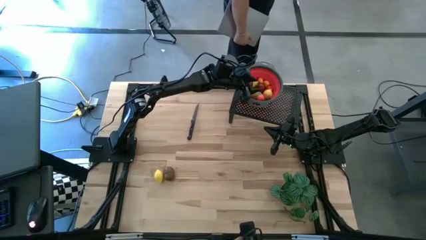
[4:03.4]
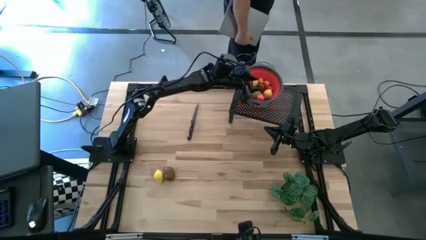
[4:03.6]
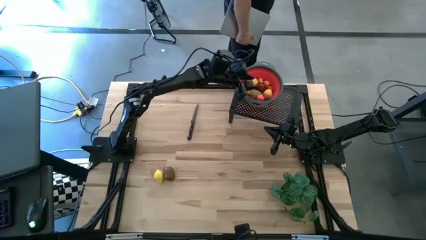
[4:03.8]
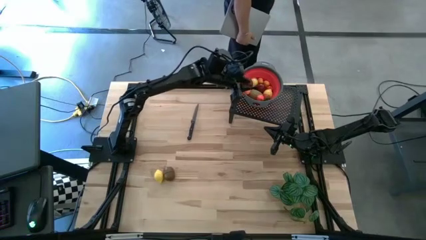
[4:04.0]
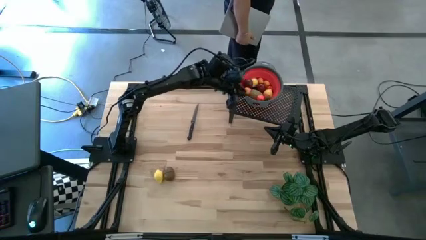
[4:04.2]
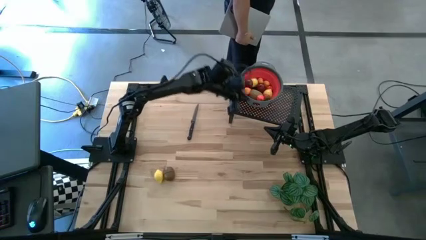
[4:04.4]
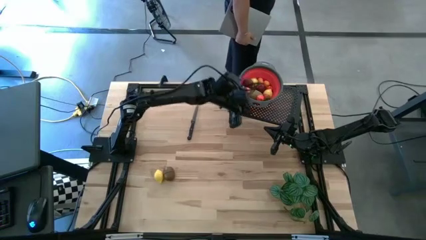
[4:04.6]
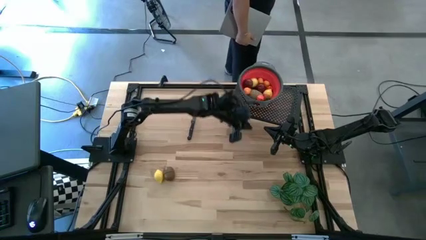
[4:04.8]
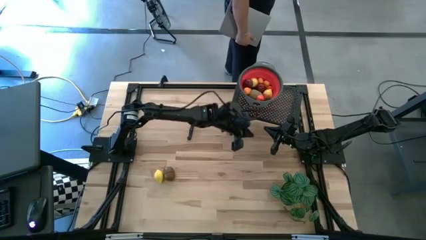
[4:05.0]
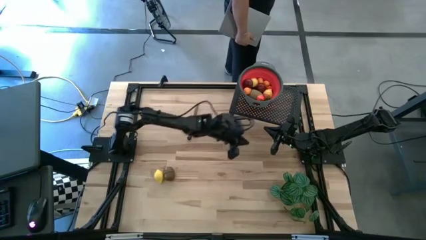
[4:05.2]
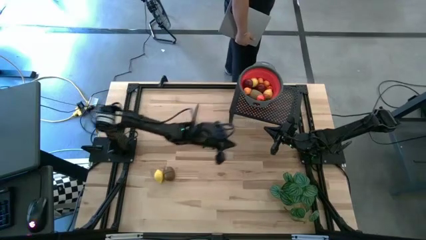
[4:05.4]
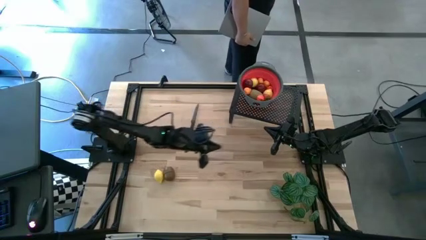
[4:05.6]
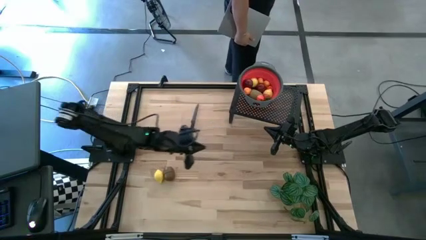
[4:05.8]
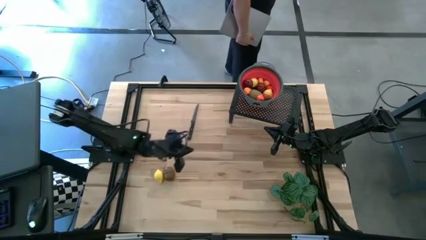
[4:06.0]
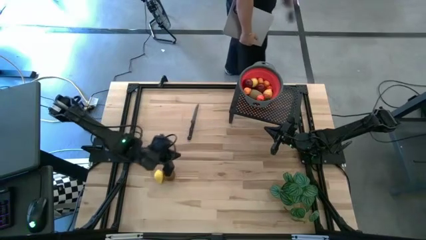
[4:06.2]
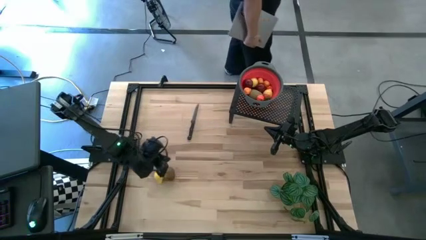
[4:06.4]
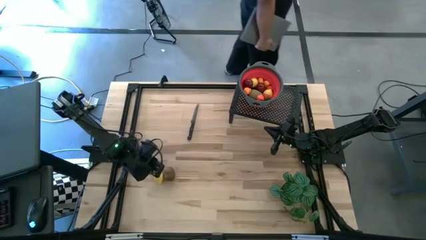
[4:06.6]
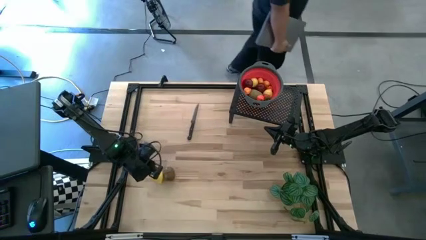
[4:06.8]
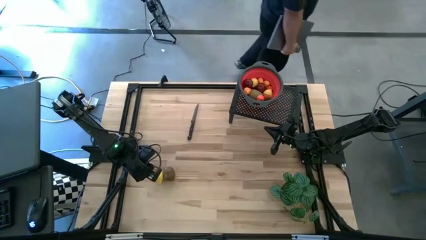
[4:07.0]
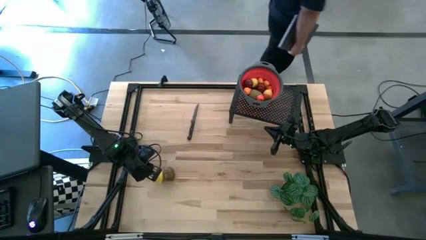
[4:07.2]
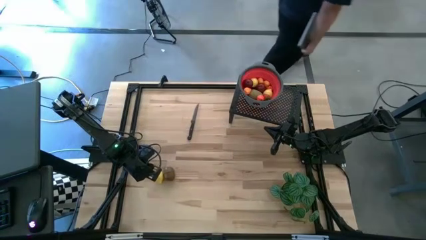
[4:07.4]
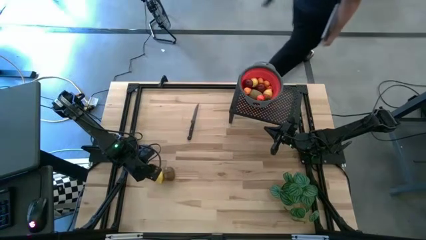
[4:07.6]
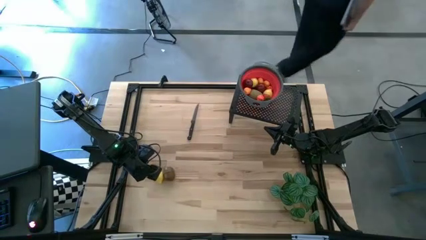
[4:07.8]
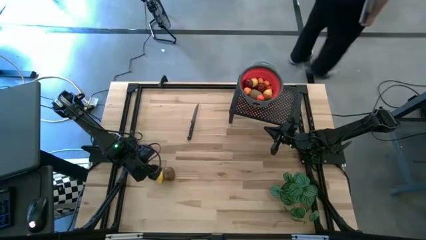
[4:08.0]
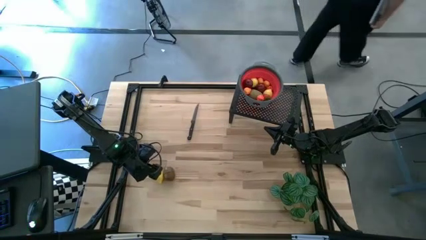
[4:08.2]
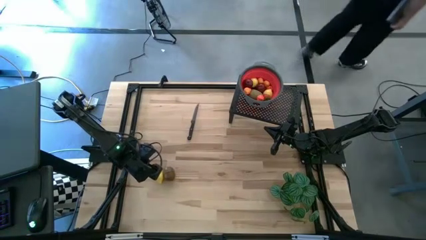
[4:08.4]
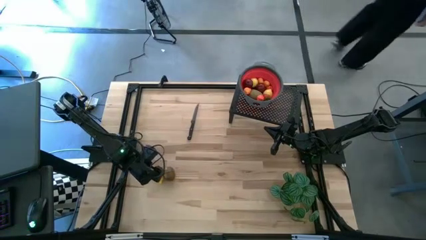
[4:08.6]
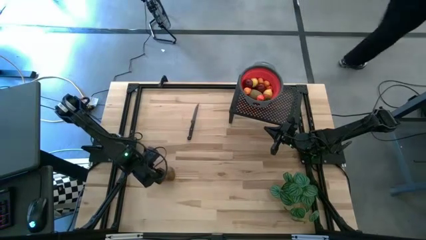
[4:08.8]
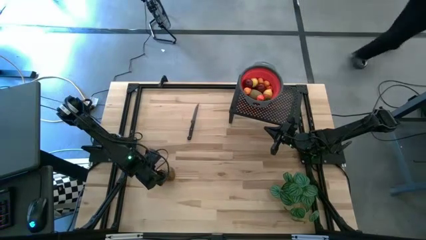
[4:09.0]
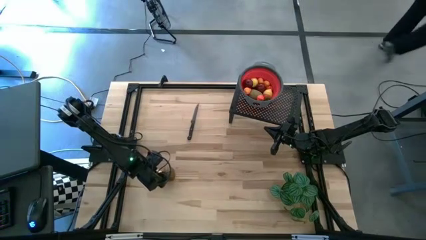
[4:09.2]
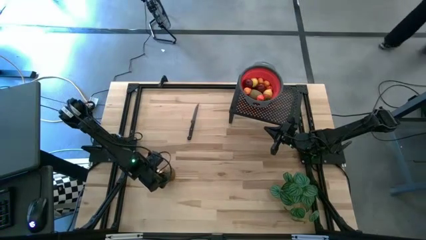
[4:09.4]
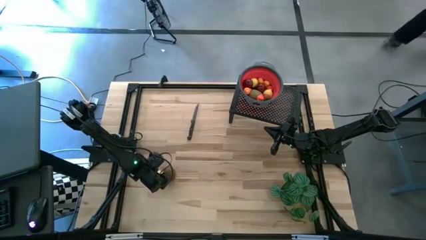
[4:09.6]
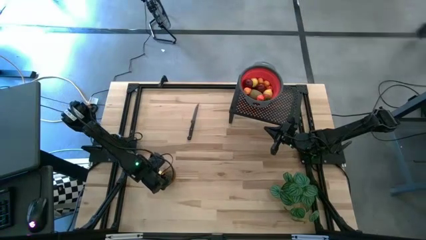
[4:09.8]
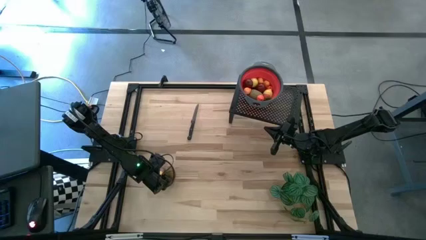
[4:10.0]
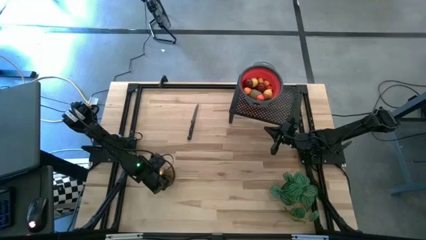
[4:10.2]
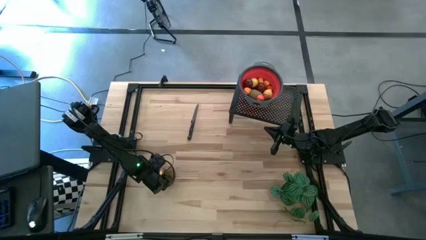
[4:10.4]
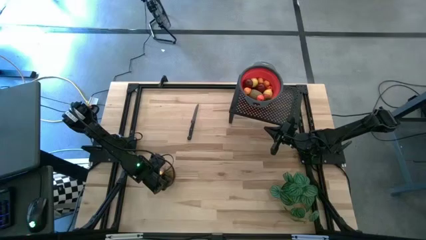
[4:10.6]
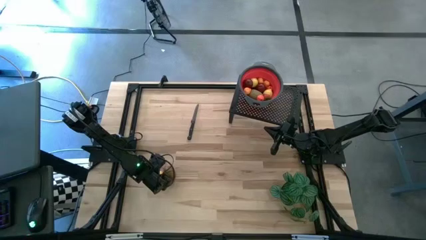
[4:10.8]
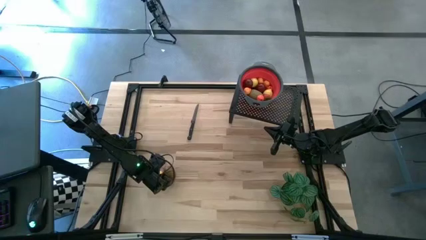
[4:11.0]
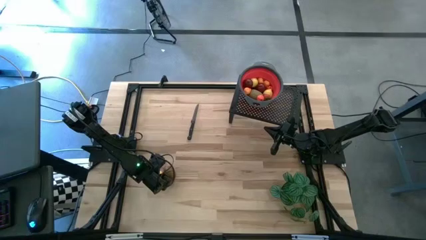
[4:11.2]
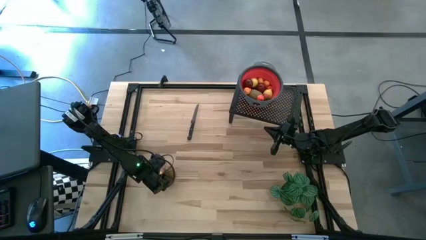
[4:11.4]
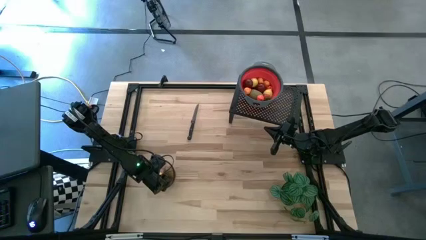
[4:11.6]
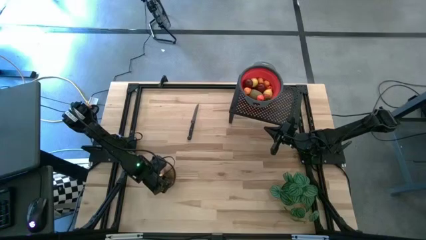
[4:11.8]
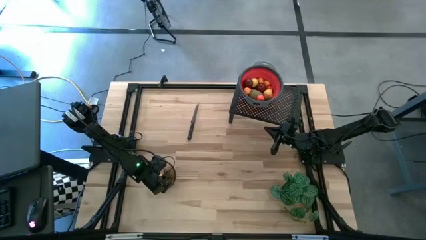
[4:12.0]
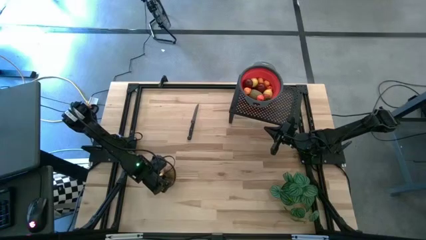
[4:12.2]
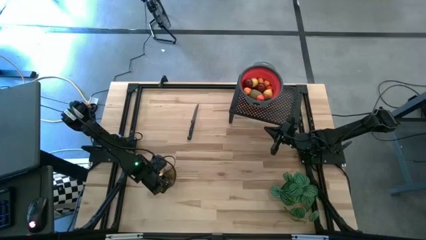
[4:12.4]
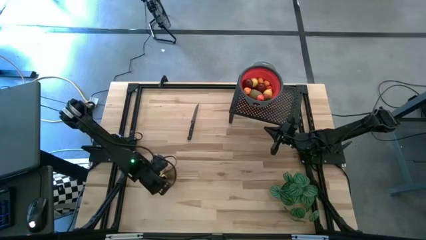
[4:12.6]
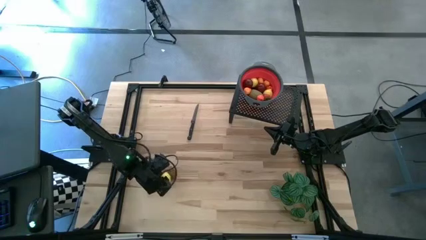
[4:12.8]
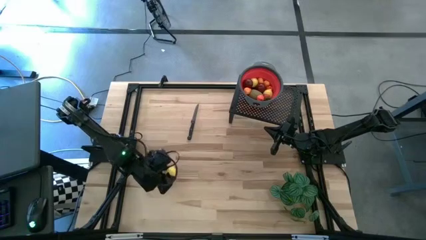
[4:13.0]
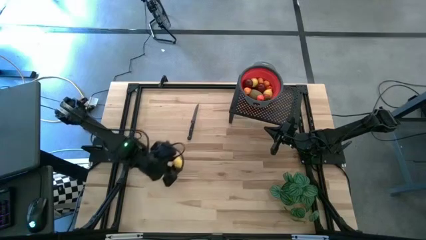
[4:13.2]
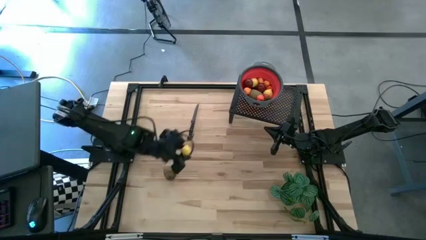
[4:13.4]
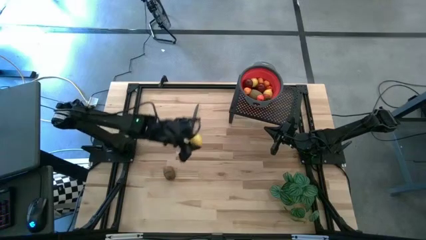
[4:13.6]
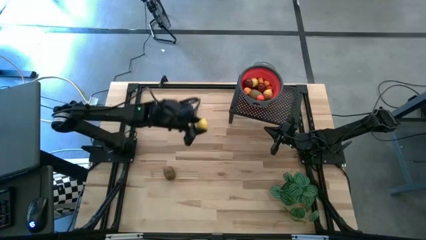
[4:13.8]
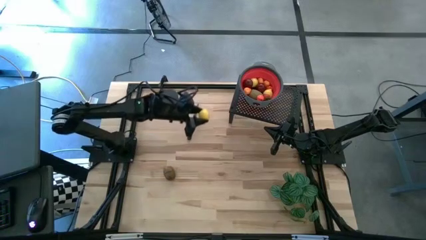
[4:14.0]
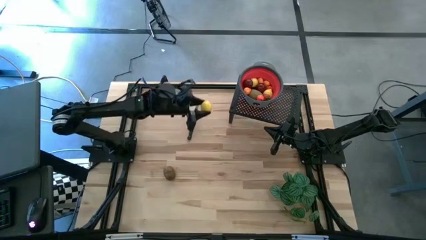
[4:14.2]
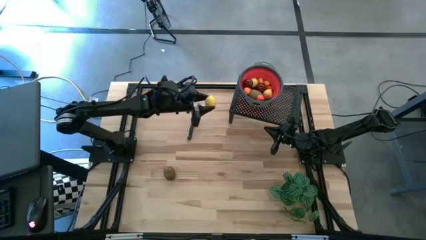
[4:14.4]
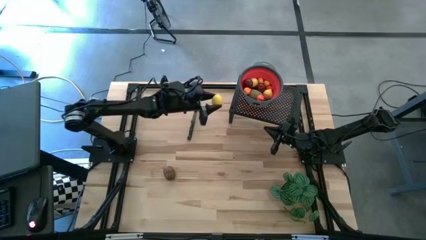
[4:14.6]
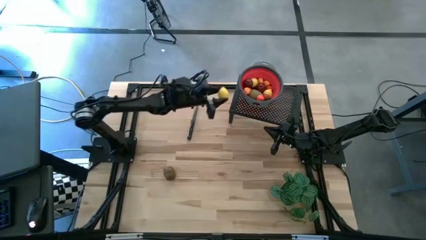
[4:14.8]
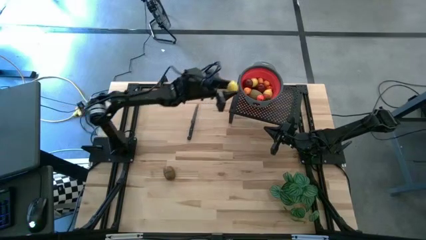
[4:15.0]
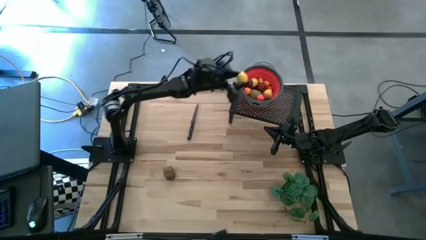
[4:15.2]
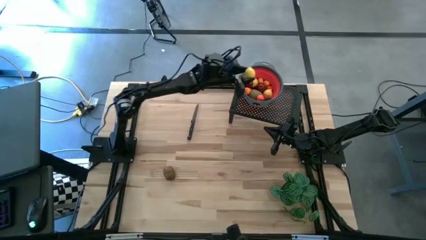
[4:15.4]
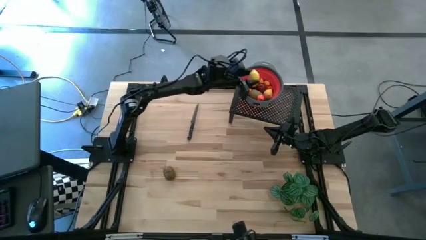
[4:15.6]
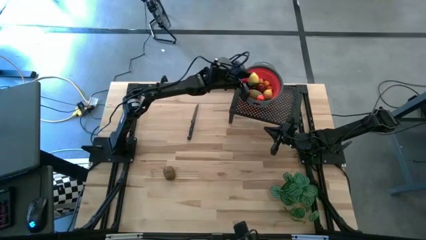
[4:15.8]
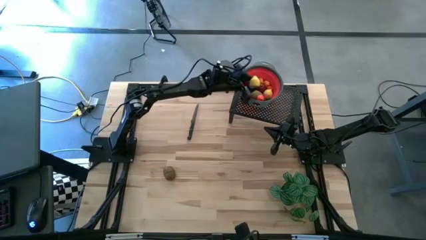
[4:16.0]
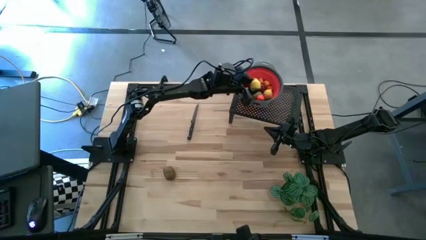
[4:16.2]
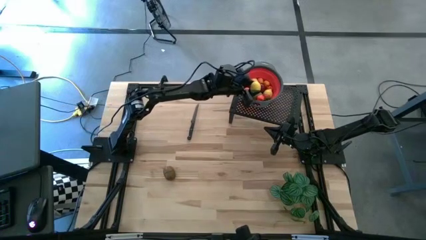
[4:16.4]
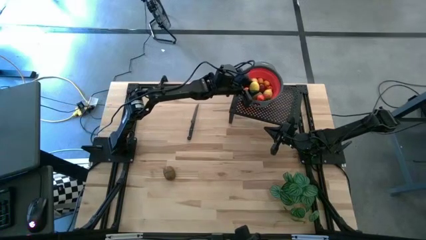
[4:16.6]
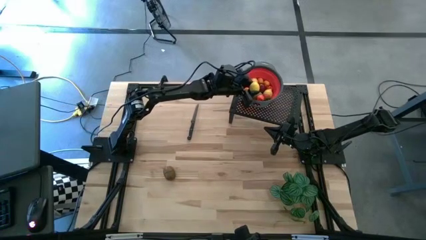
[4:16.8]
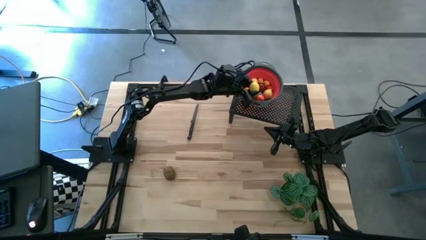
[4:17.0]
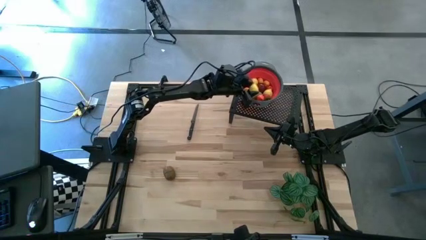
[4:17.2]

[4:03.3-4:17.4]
Task: Pick & Place Fruit
Put the yellow lemon into the red strainer bowl on the shelf

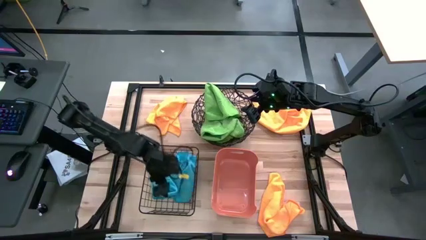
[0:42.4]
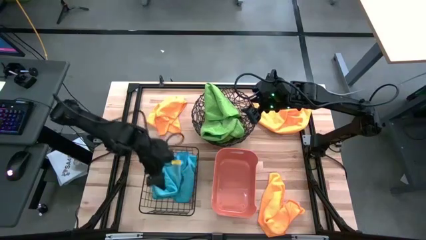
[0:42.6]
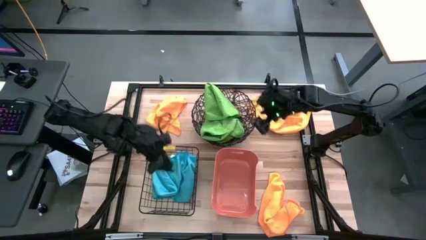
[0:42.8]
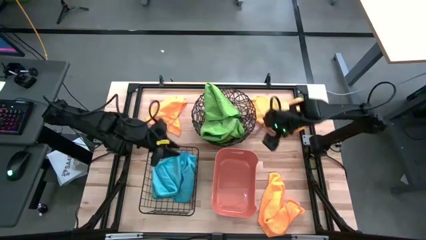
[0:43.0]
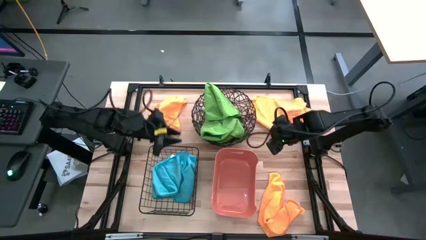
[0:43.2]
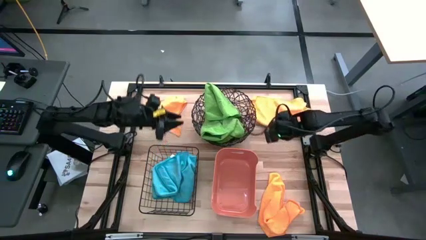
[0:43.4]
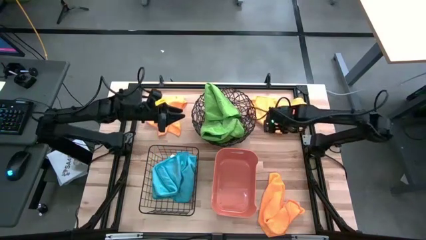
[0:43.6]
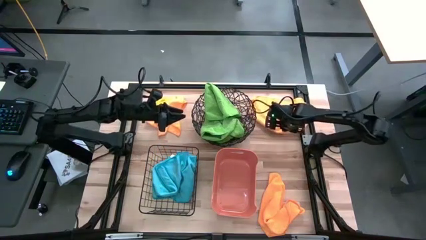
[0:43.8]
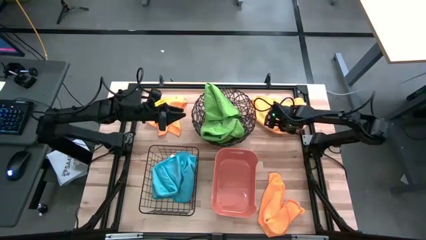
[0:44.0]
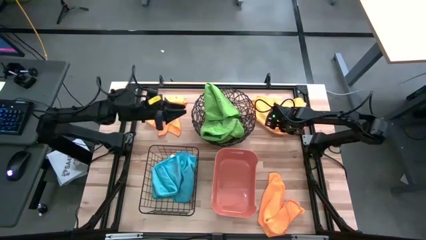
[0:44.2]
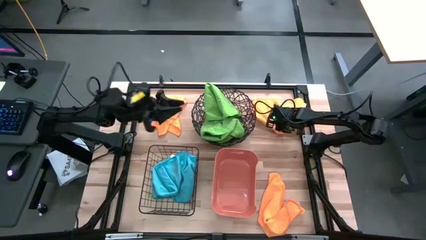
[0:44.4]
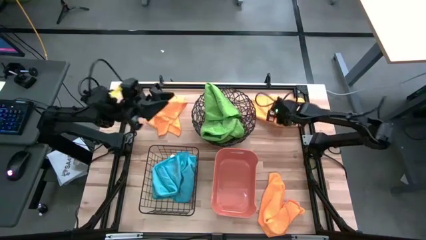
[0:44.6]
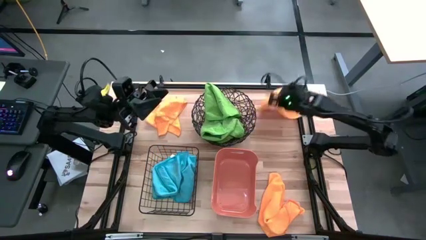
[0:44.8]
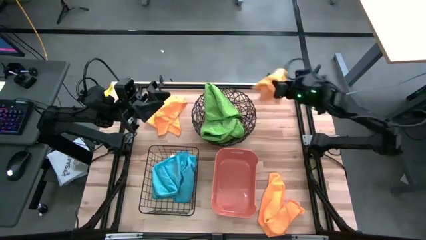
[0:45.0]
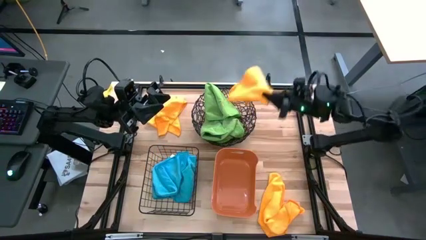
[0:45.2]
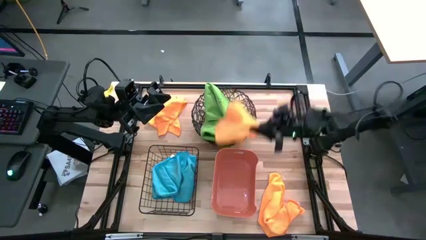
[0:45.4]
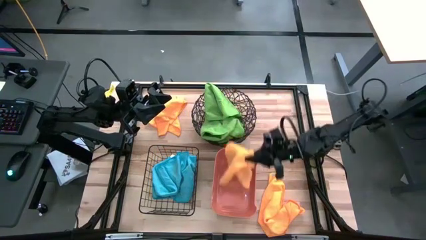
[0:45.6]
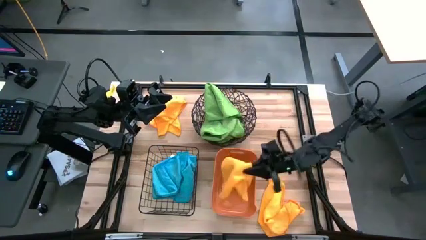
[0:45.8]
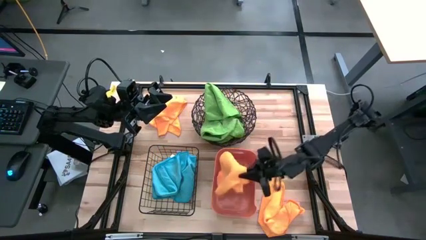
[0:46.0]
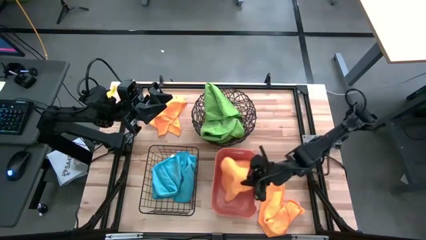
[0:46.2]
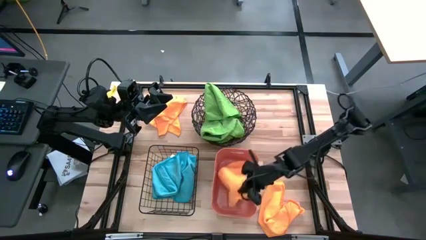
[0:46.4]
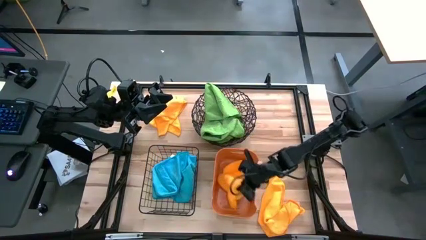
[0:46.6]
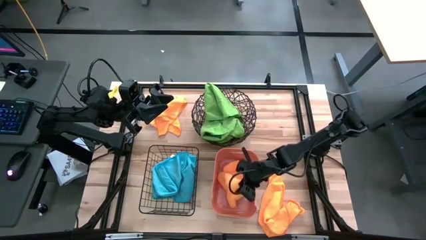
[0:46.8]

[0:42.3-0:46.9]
Task: Sort microfiber towel by color & place in baskets
Put the top right orange microfiber towel into the orange bin
